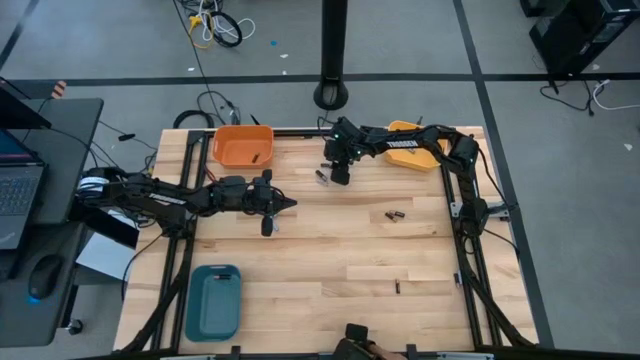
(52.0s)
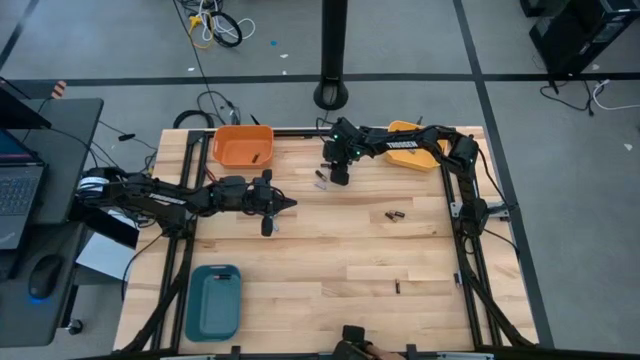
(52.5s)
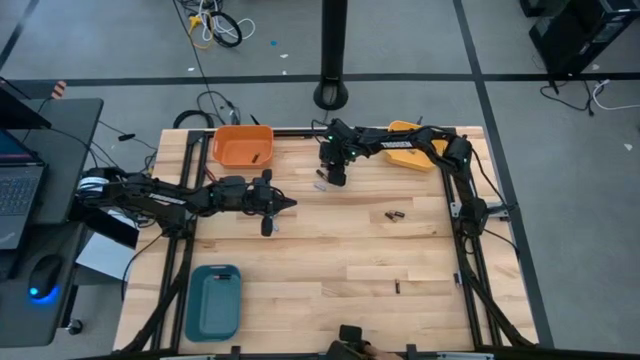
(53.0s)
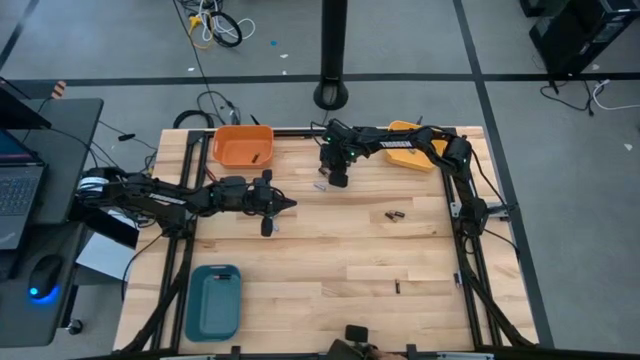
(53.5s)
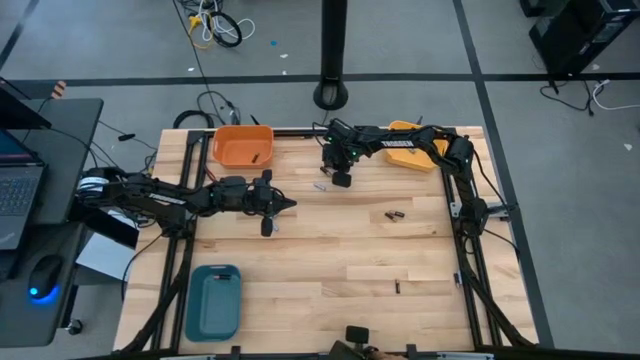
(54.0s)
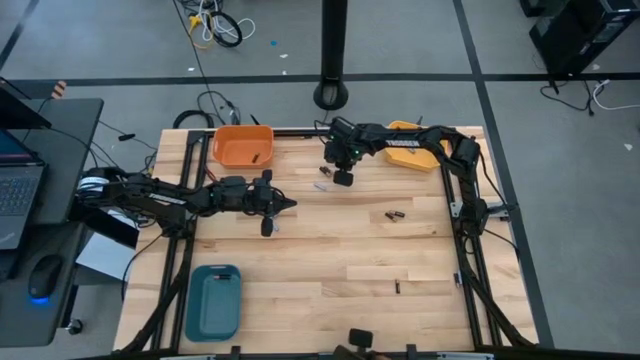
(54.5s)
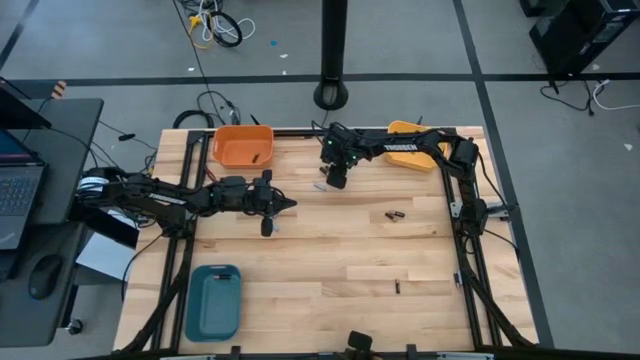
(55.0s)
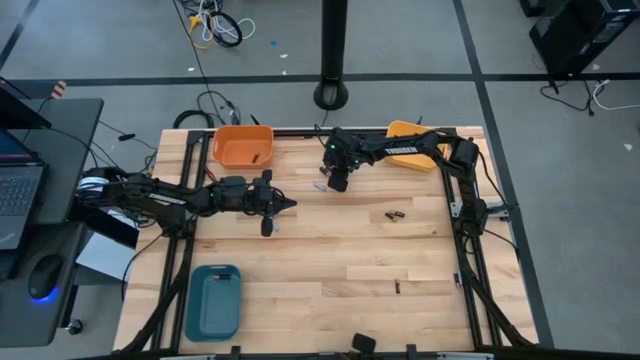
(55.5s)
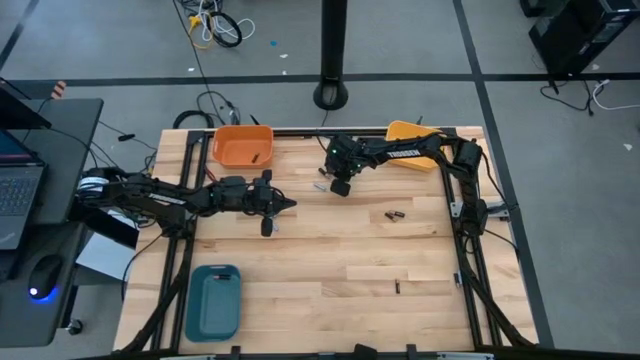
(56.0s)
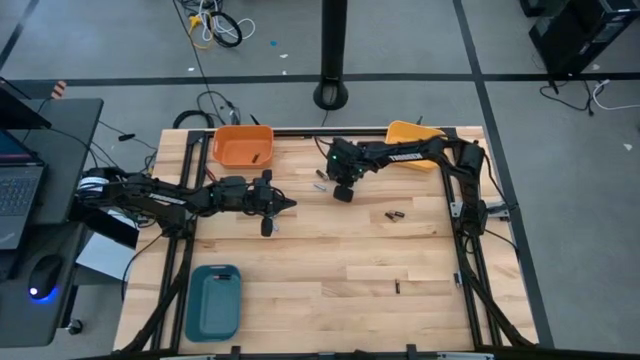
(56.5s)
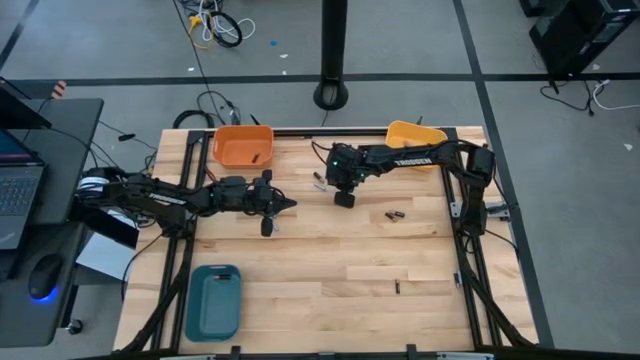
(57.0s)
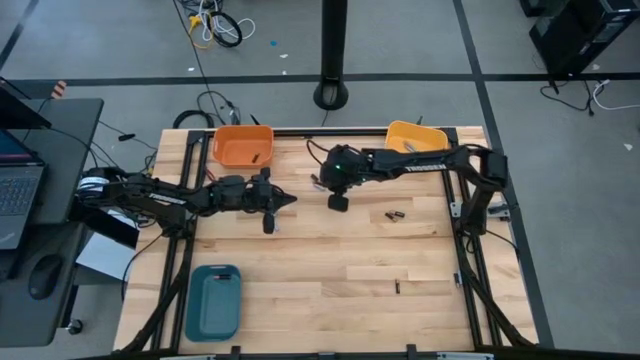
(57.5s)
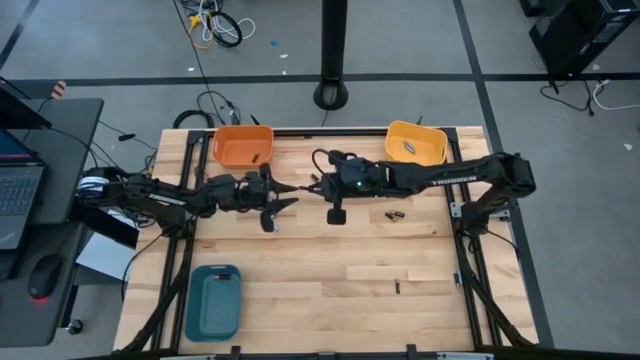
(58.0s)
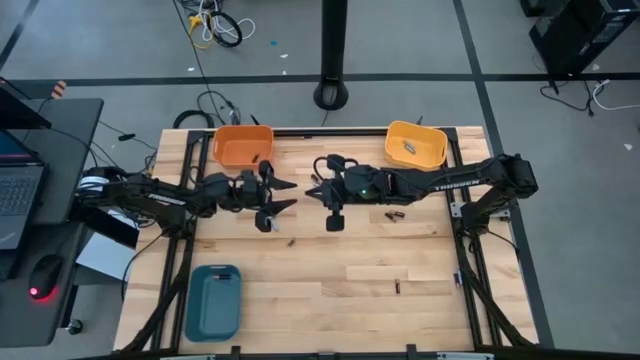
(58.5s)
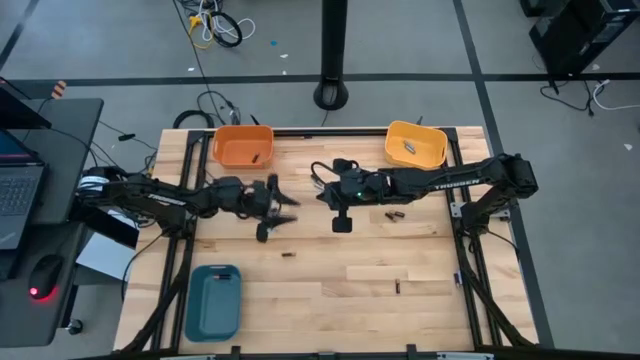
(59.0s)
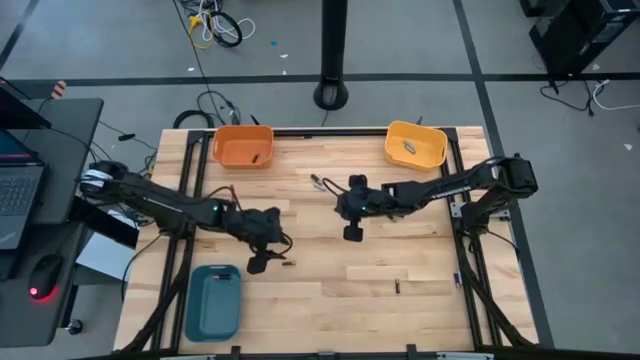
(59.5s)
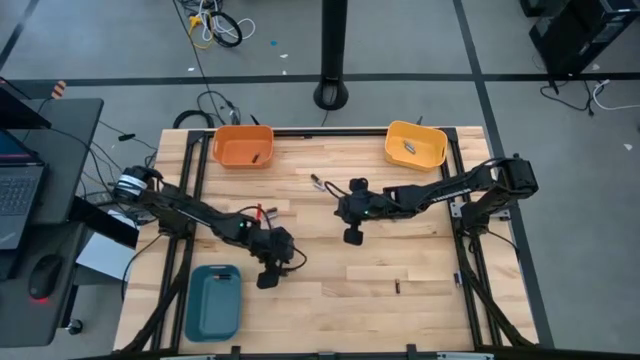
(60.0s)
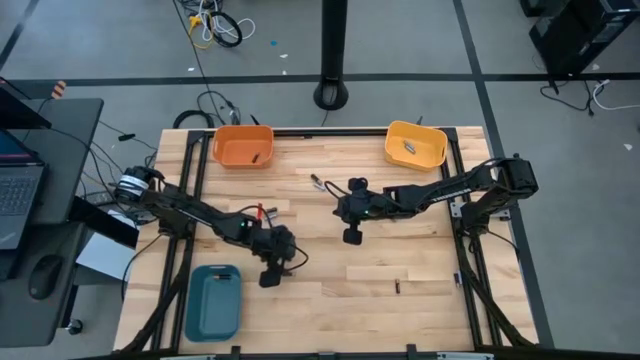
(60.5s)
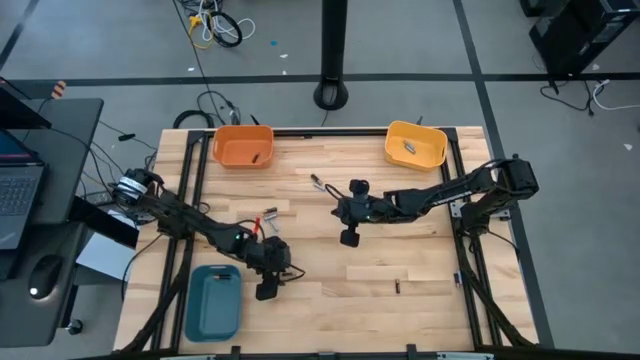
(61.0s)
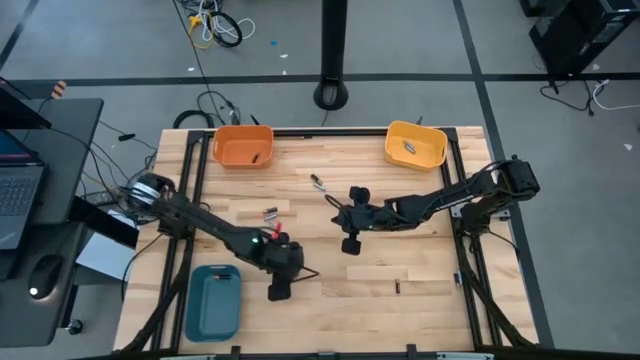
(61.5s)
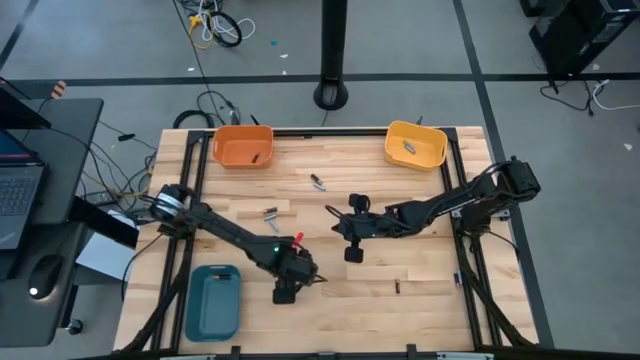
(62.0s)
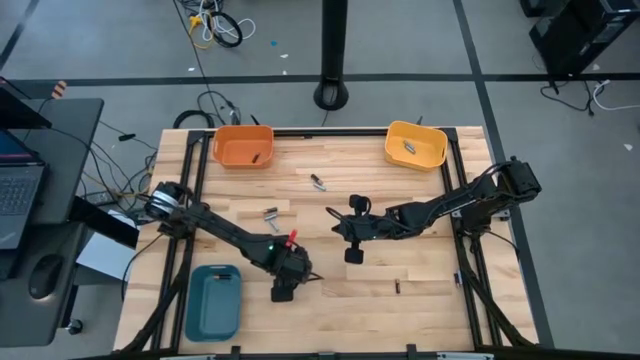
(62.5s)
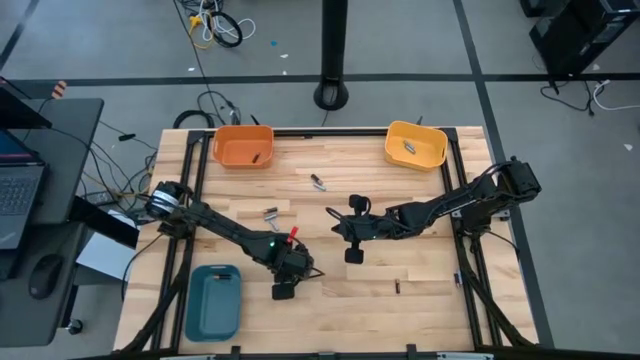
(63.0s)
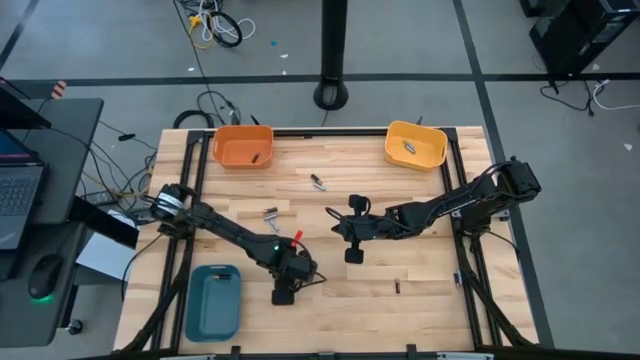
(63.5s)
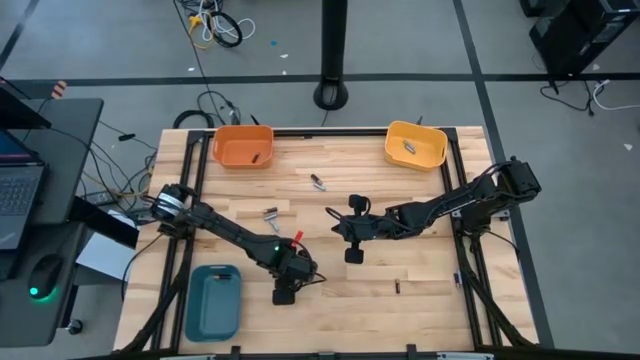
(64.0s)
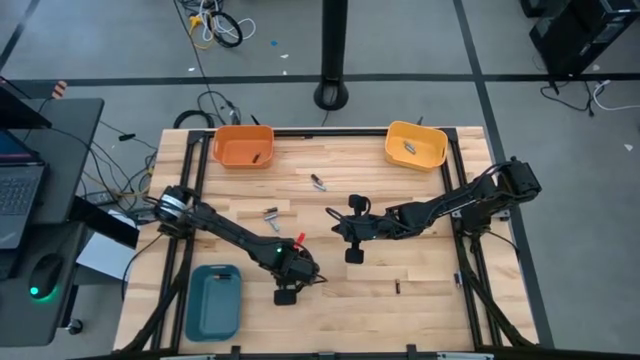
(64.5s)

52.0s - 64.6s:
Task: Sort batteries
Put the small copper and black battery into the orange bin

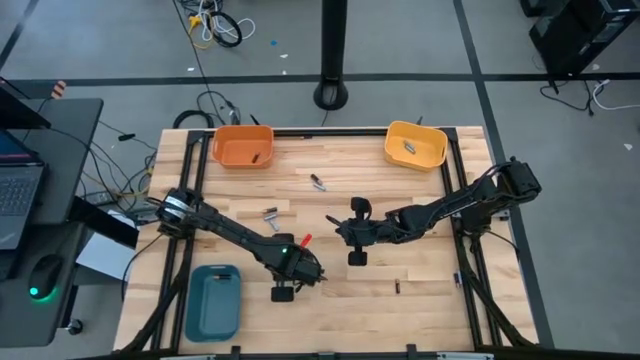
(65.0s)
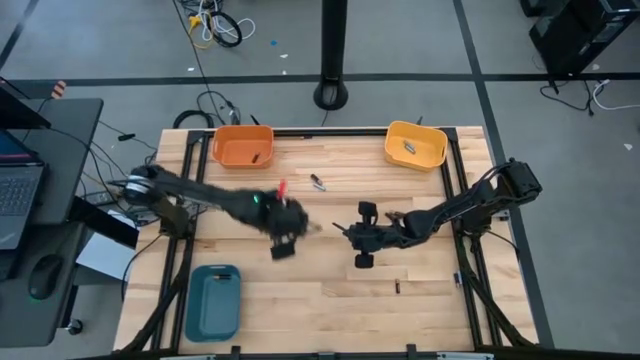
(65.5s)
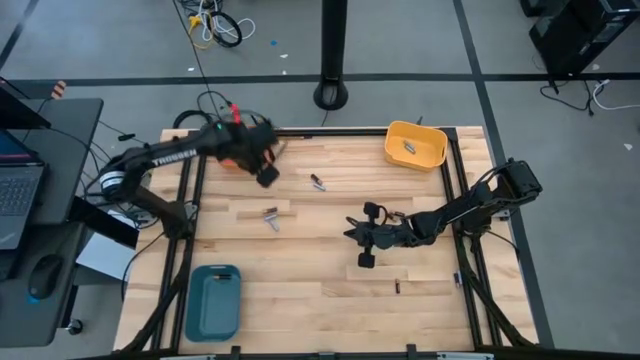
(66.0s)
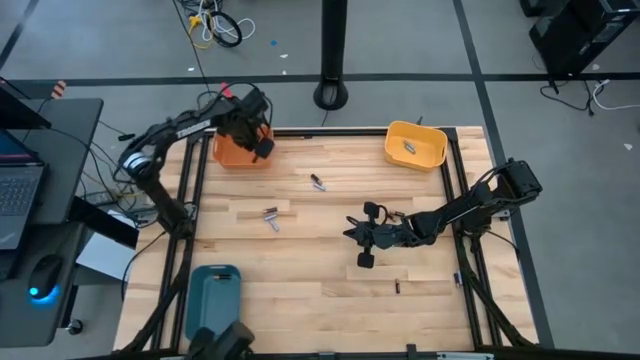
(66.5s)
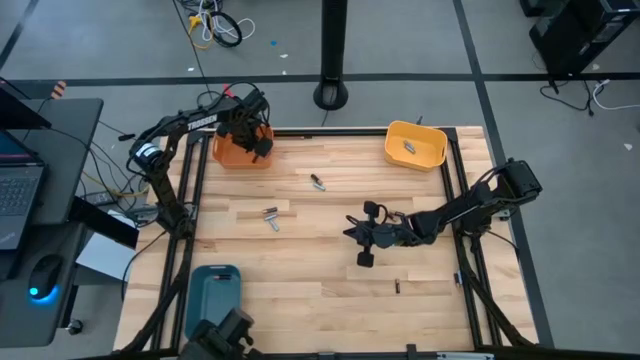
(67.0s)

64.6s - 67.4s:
Put the small copper and black battery into the orange bin

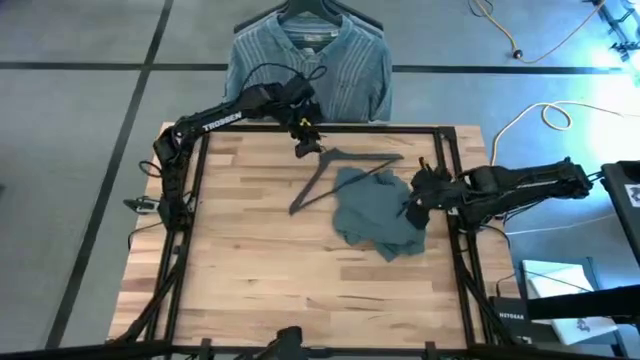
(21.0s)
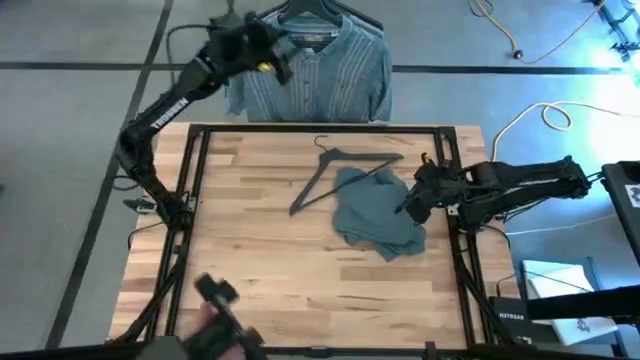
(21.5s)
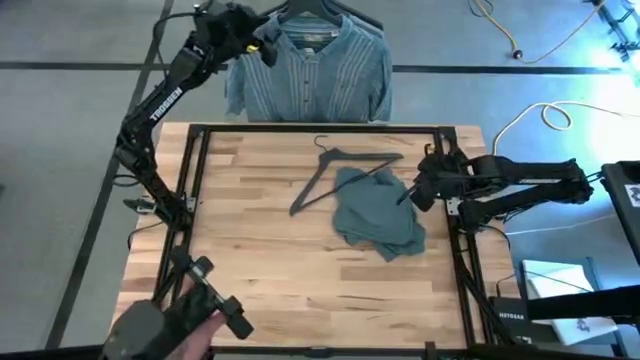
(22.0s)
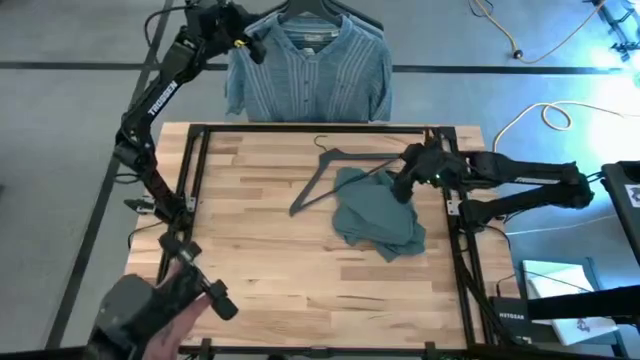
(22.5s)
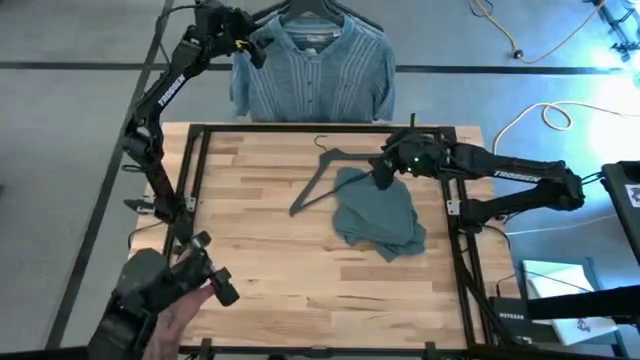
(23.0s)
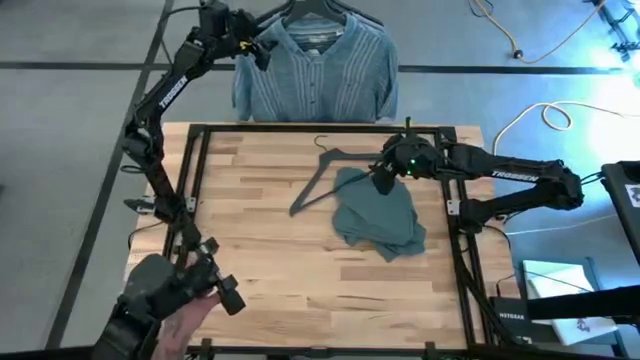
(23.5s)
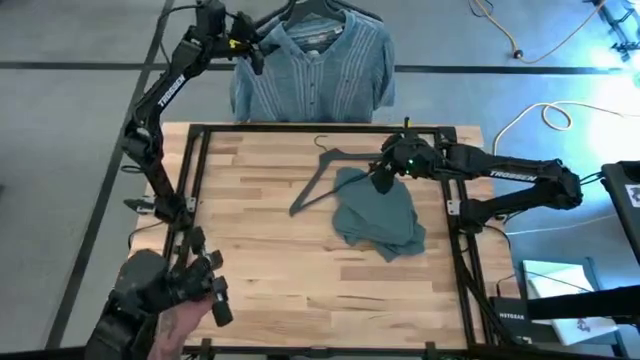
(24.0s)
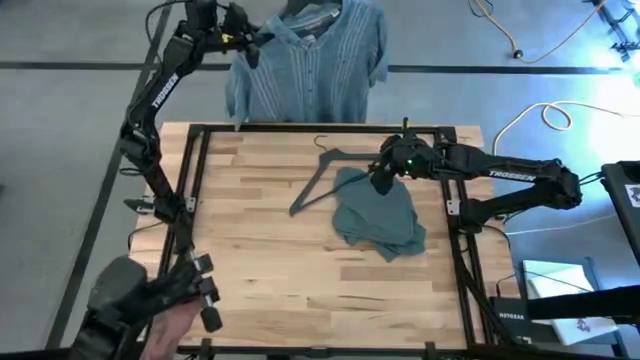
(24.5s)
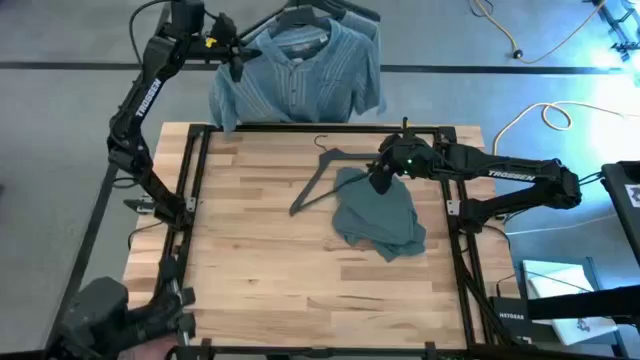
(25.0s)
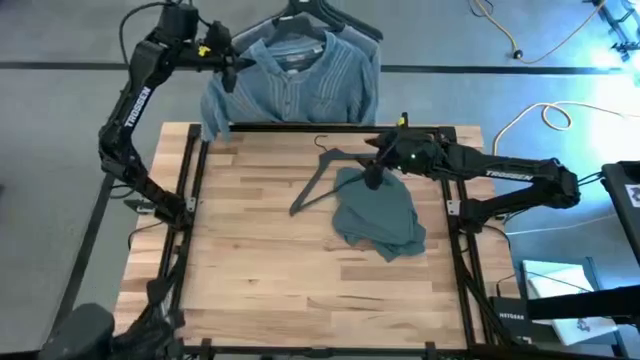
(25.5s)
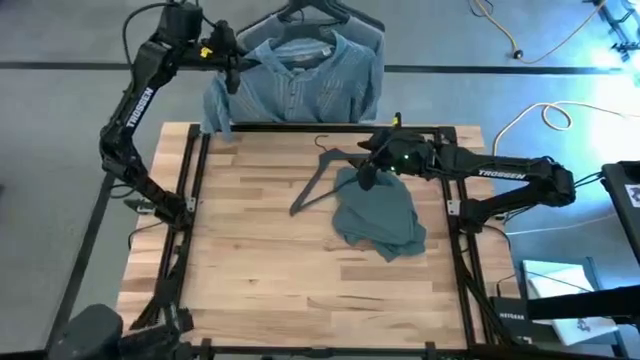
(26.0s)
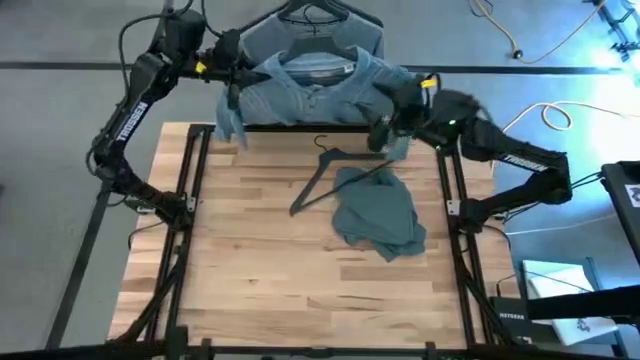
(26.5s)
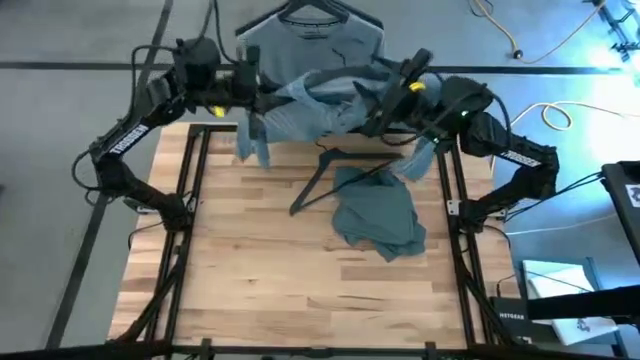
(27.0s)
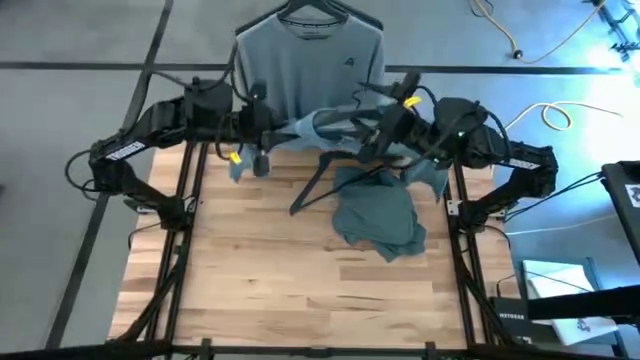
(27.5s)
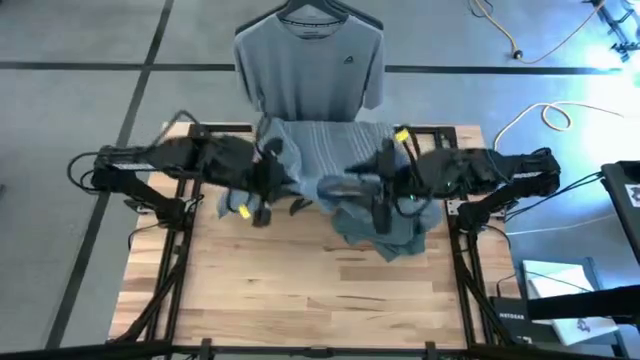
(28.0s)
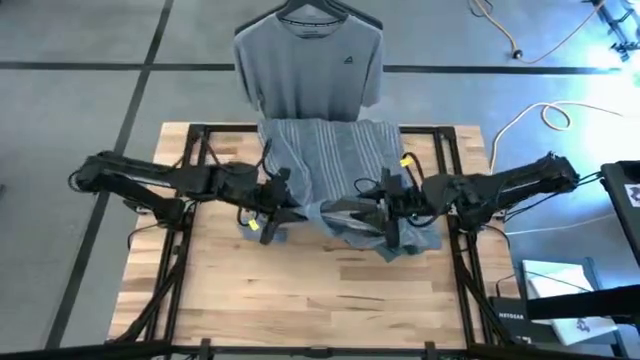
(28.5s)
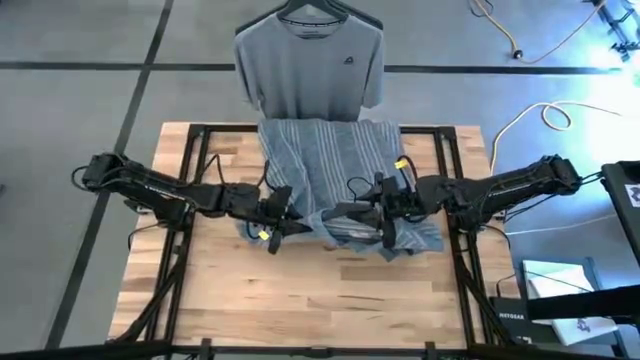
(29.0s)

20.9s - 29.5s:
Task: Unhang clothes
Unhang the polo shirt
